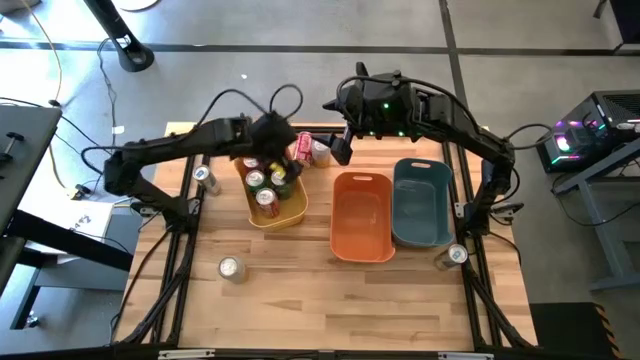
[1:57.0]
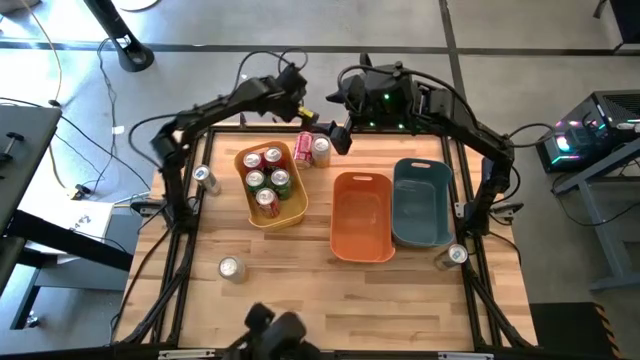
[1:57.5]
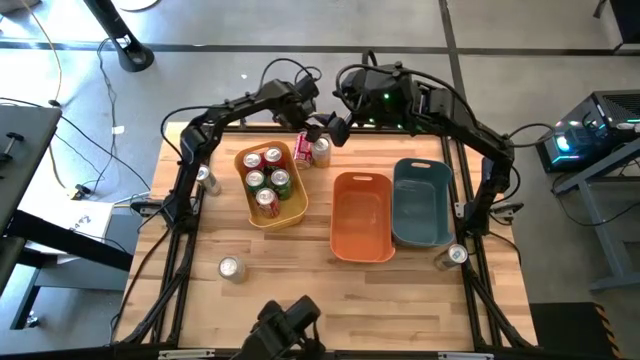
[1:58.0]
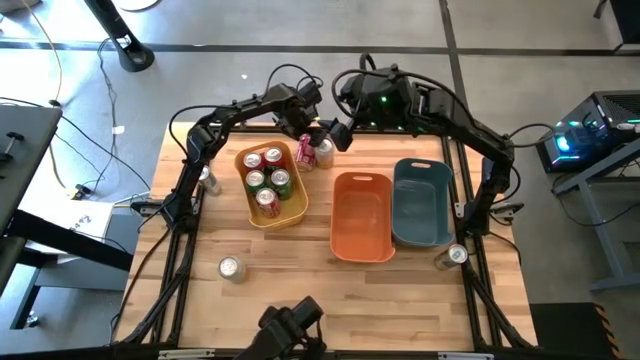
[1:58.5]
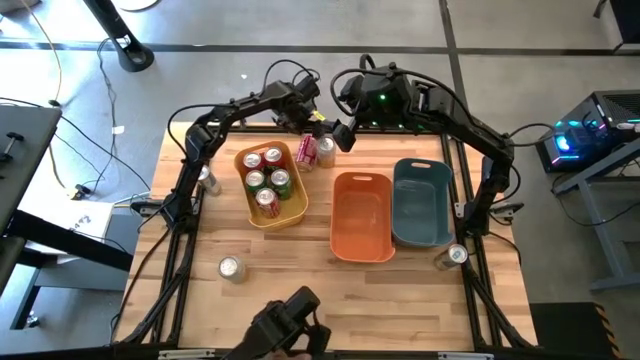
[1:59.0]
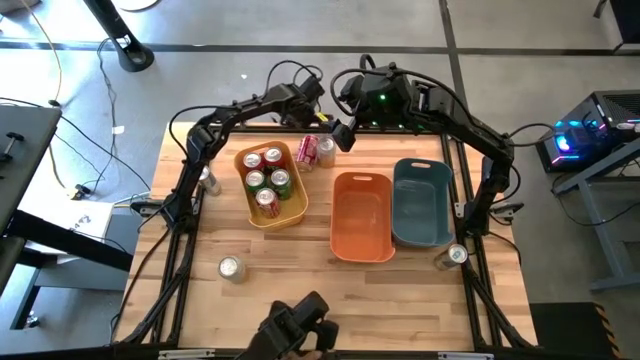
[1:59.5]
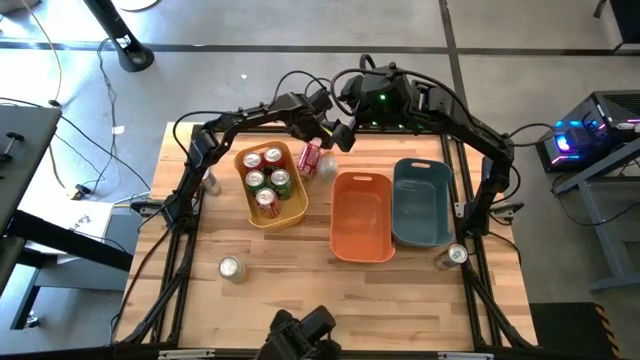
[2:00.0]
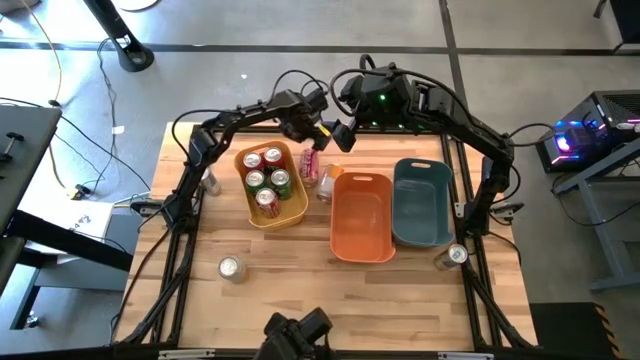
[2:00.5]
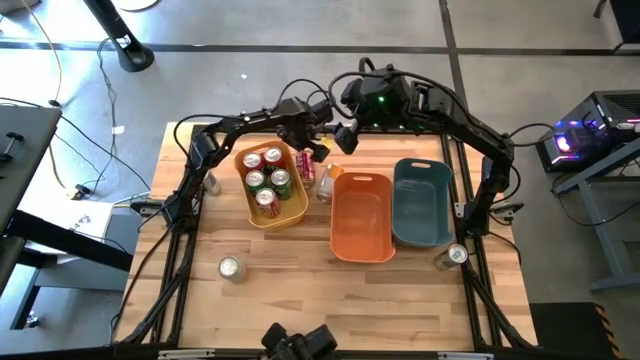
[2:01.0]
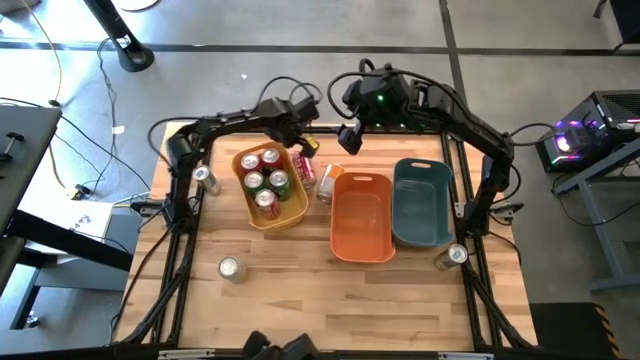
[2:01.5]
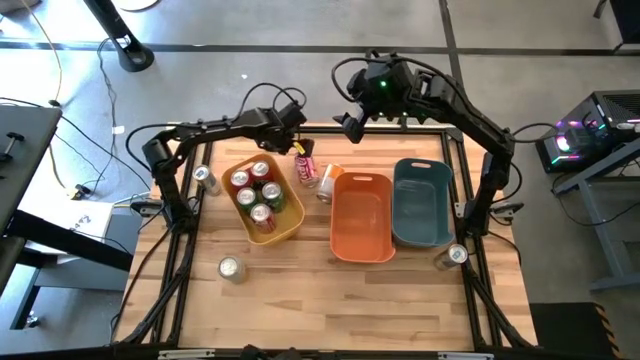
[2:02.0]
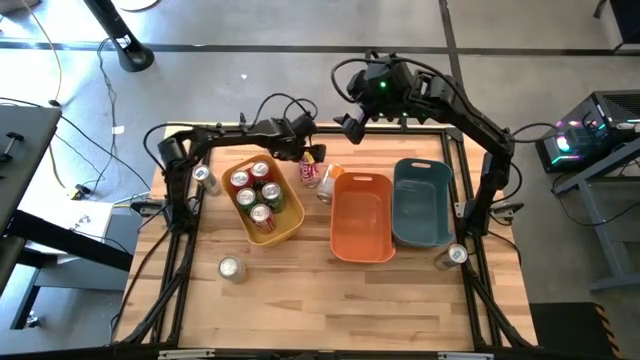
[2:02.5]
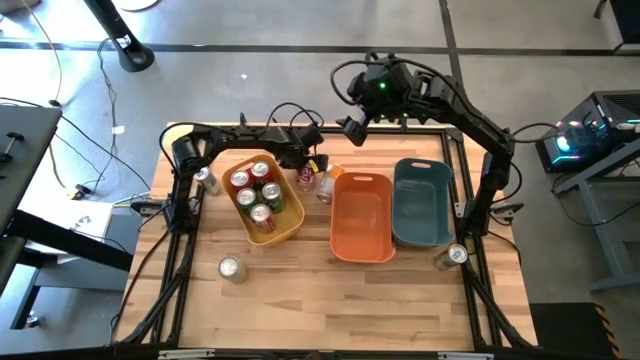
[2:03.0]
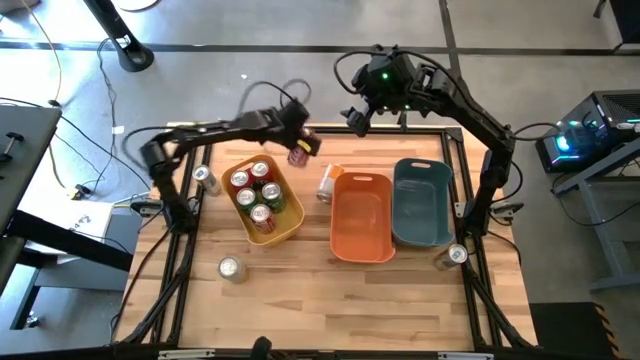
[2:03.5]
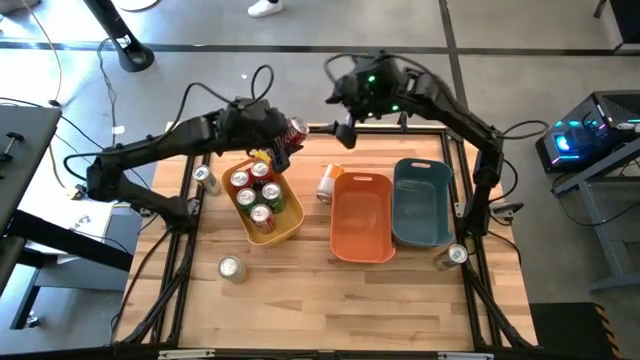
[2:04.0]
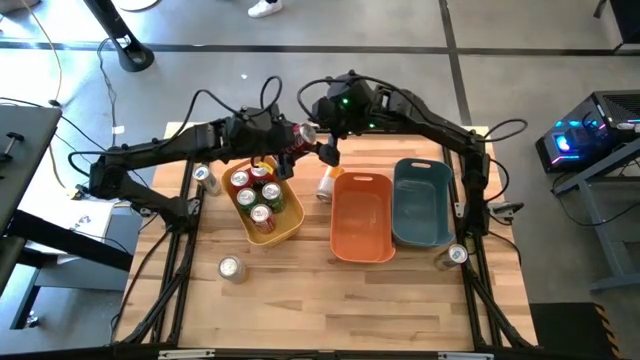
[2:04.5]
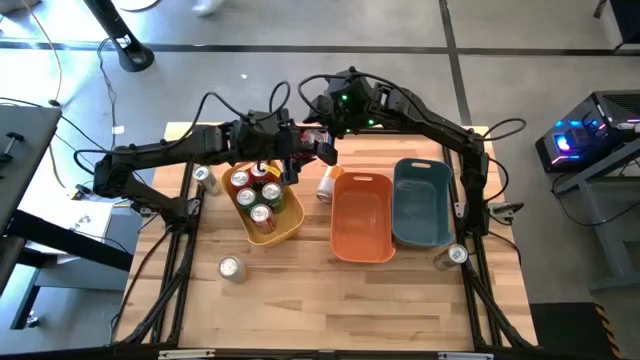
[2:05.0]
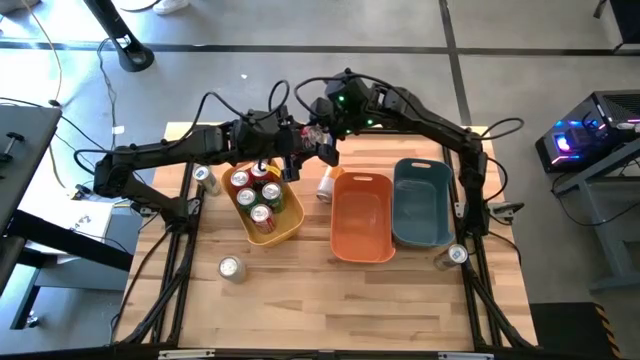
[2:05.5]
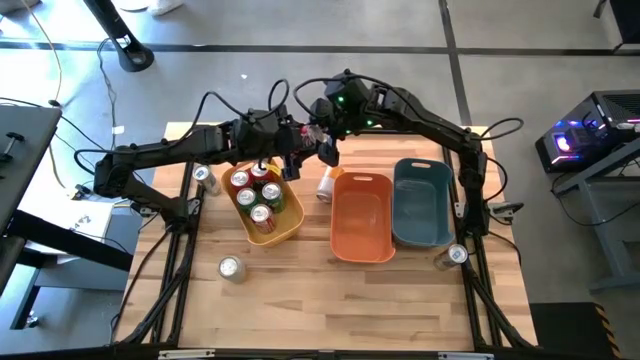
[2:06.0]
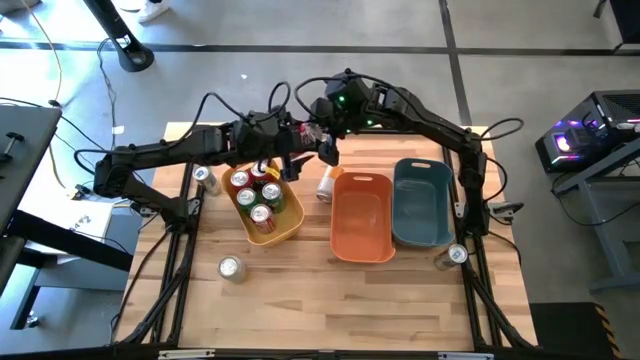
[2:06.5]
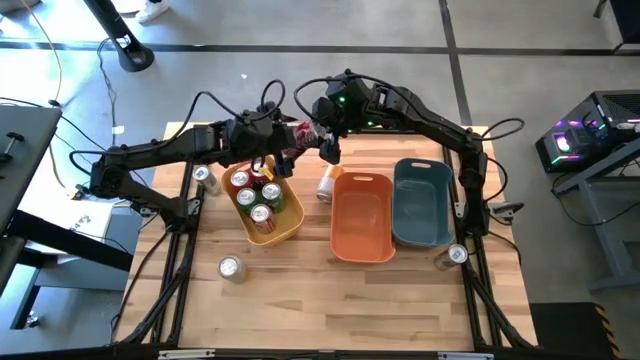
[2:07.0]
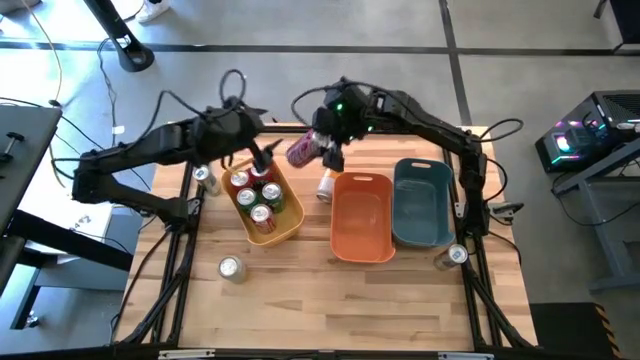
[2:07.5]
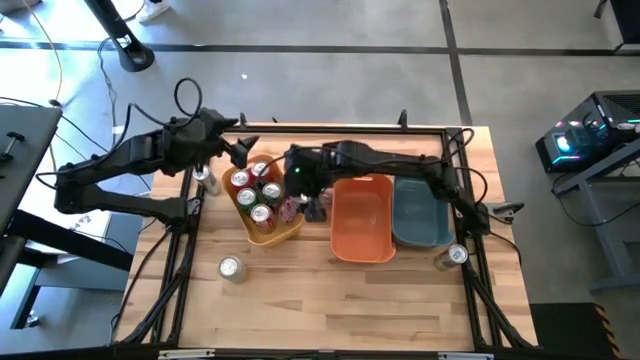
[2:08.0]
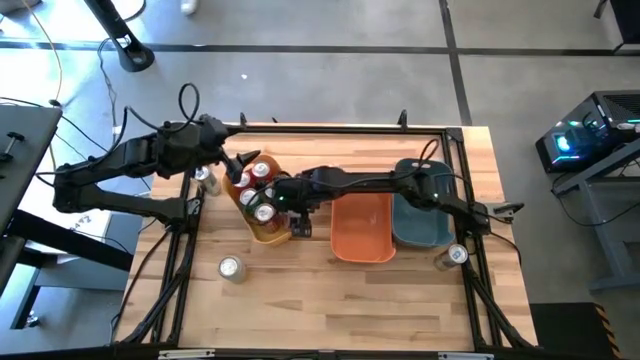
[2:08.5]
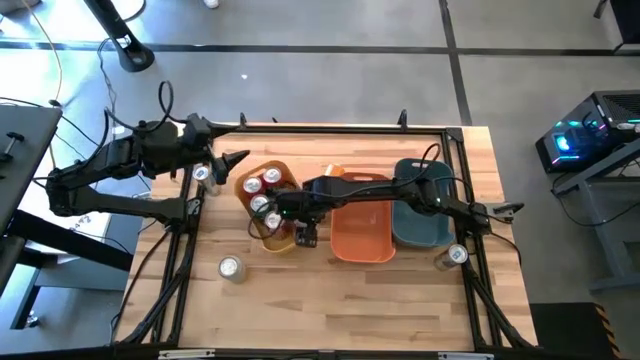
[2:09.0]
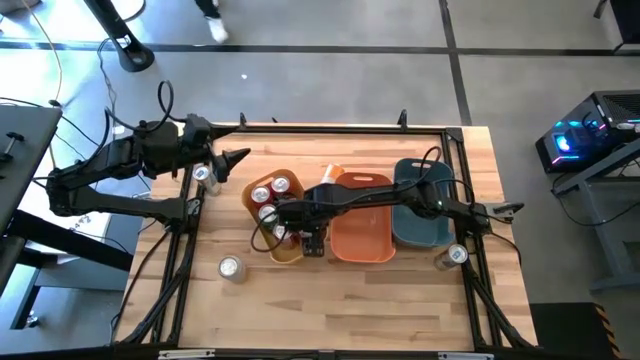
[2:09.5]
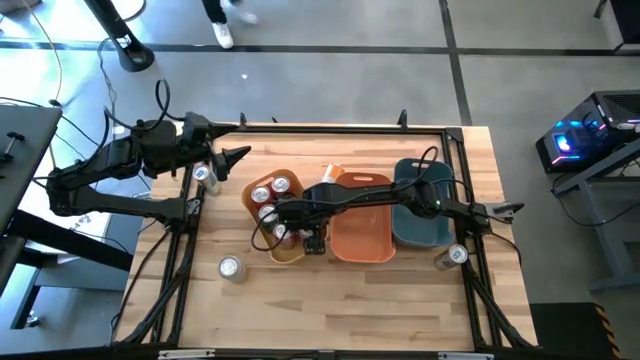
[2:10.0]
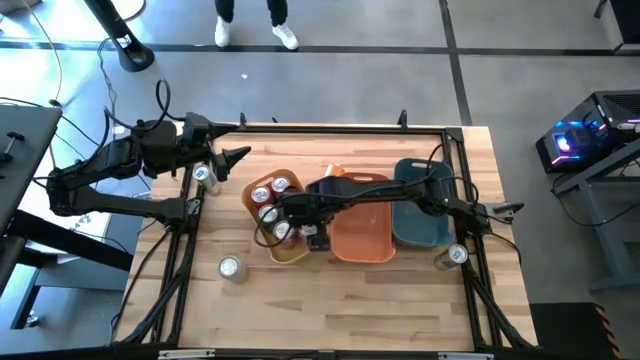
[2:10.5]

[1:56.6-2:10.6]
Task: Sort soda cans
Put the red-white soda can into the yellow bin

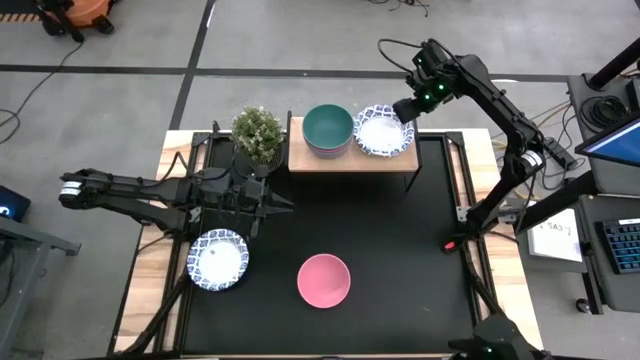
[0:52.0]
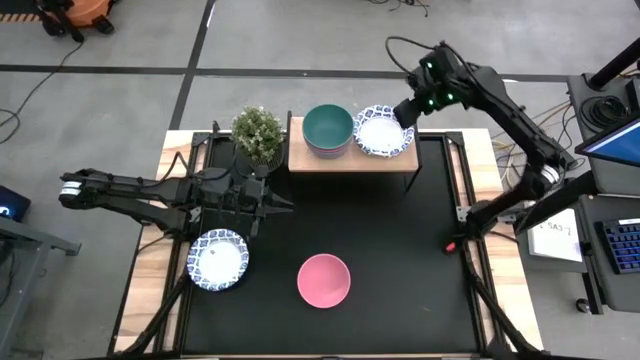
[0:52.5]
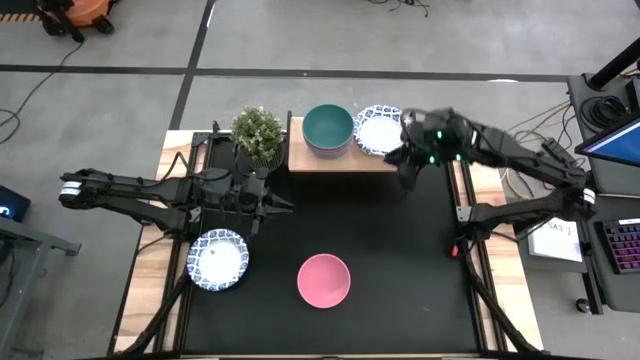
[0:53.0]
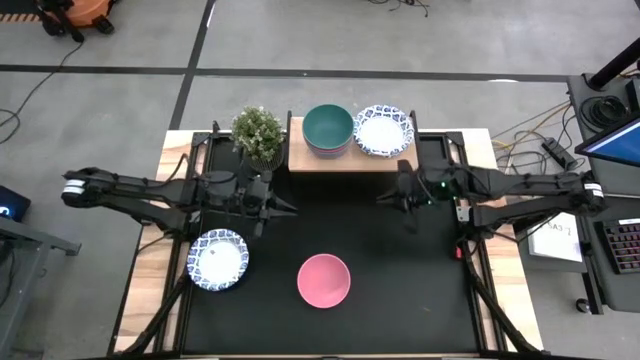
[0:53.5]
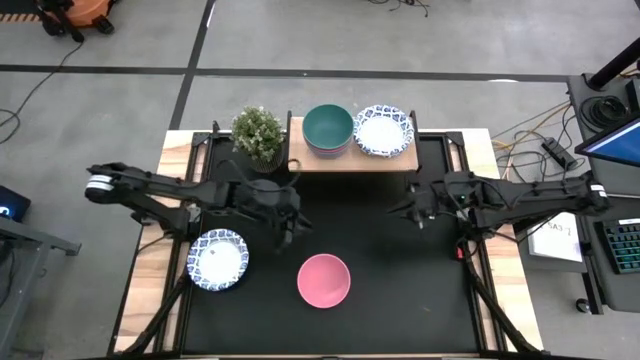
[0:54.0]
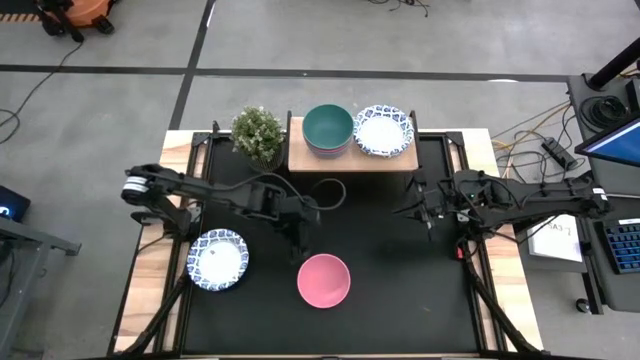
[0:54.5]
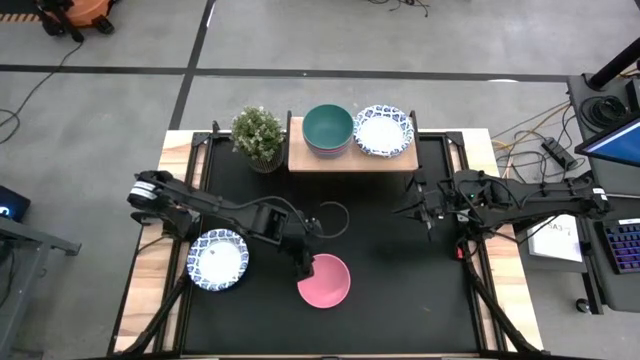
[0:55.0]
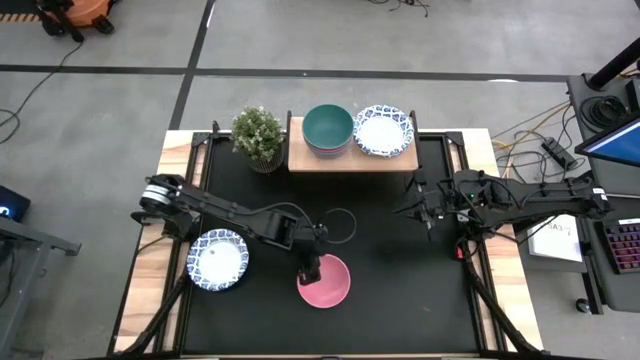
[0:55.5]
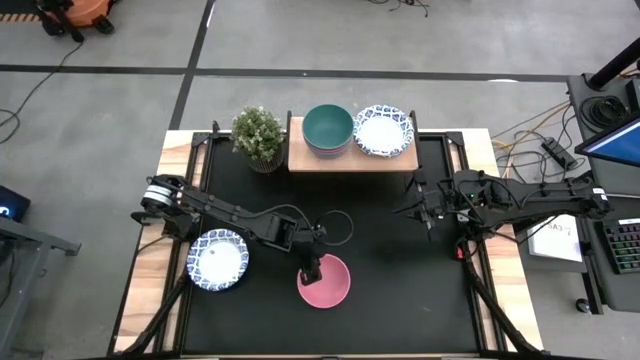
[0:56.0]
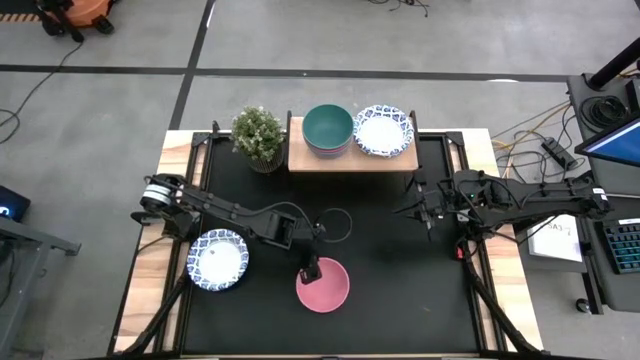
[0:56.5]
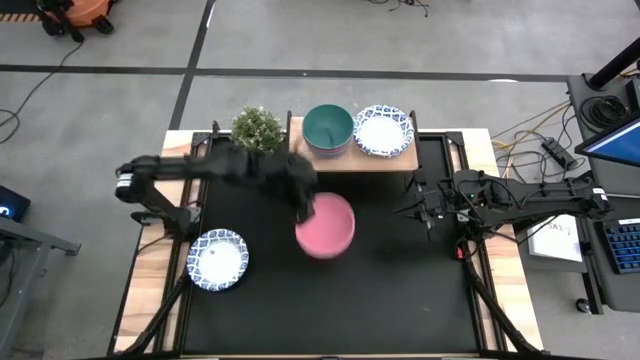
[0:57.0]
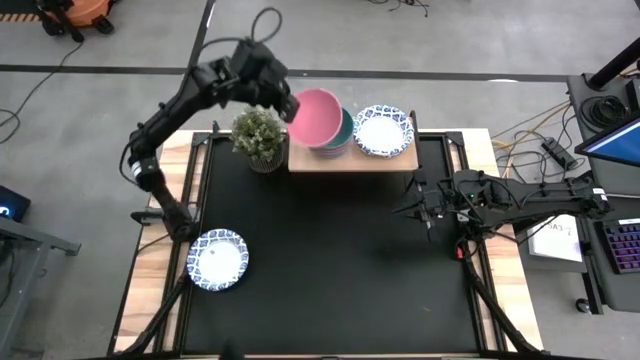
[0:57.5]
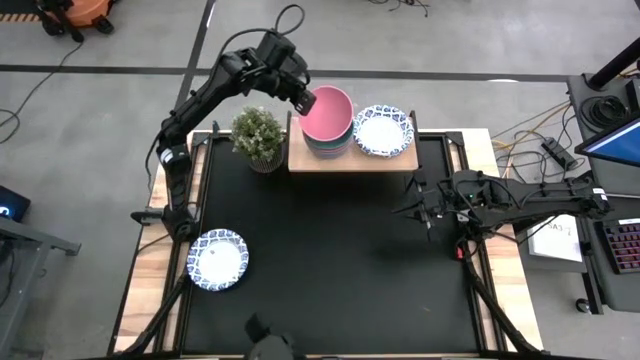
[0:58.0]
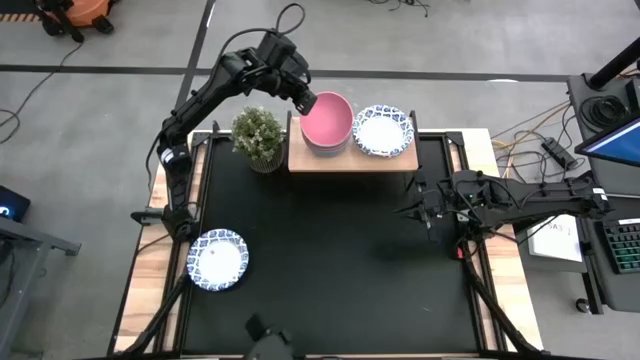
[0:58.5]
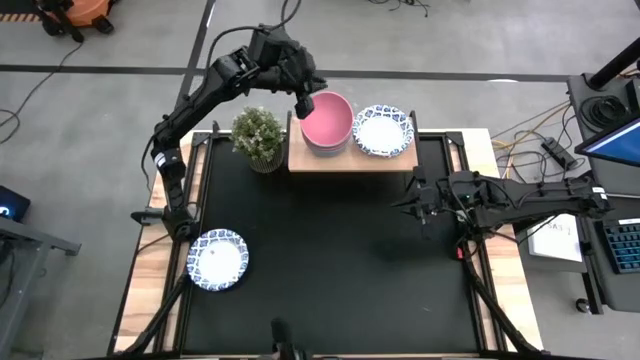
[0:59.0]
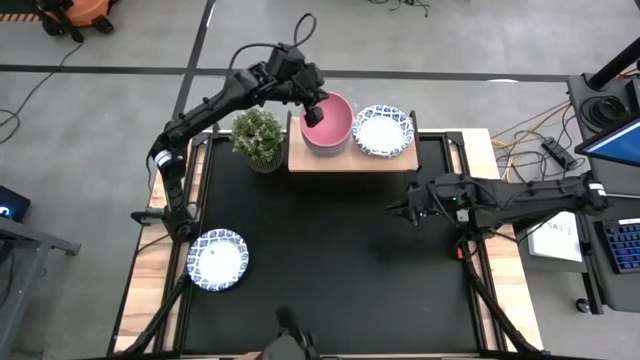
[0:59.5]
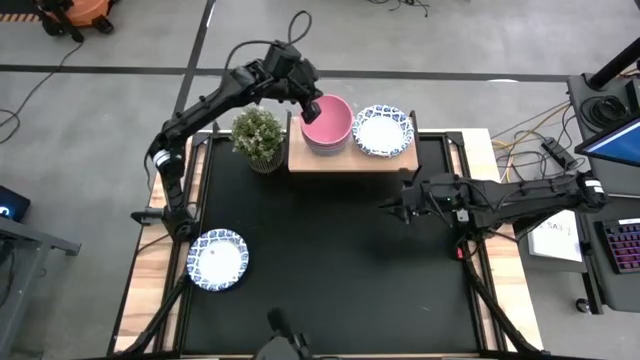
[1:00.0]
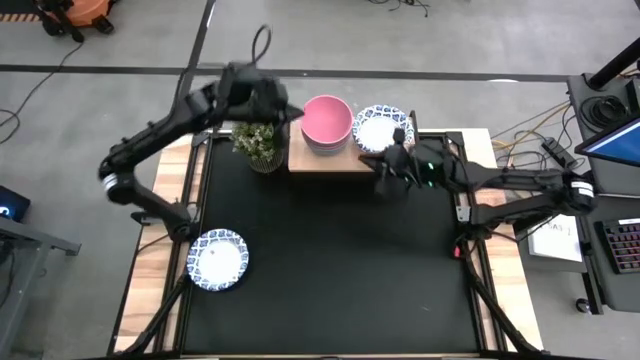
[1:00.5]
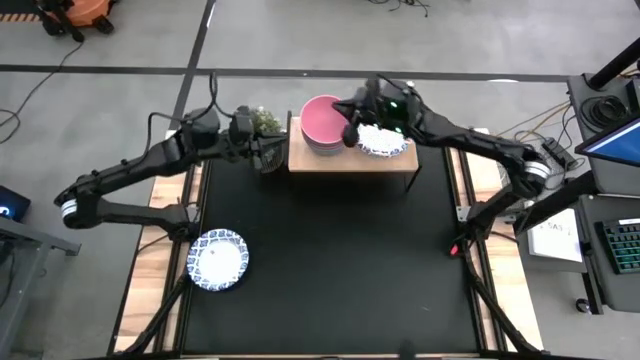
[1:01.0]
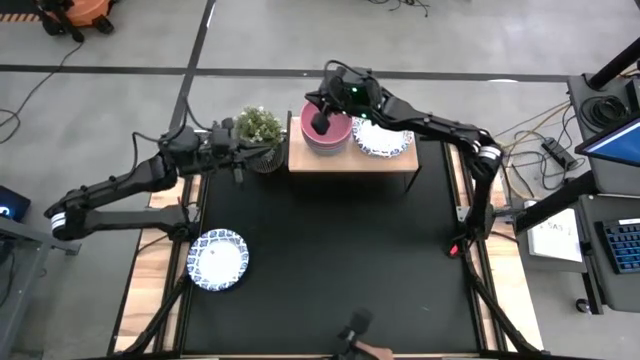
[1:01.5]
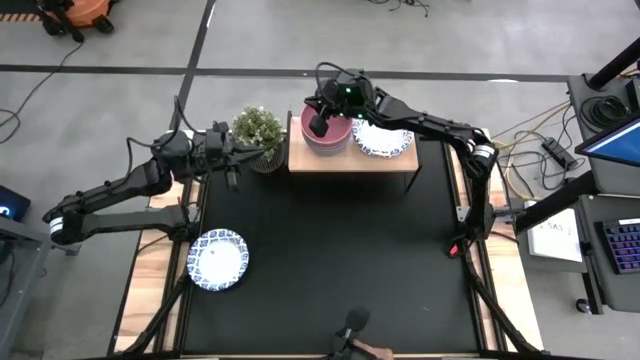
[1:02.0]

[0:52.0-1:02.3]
Task: Place and stack bowls onto a shelf
Stack the pink bowl on top of the green bowl
